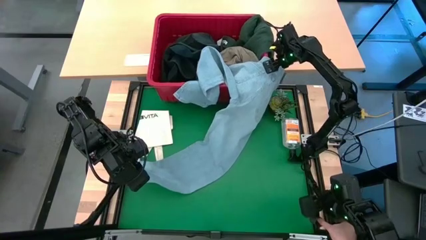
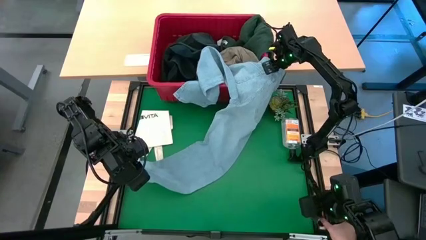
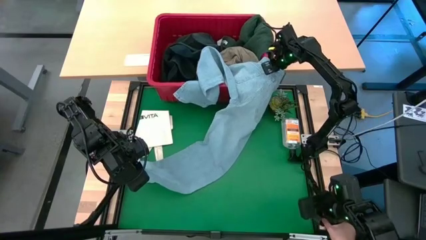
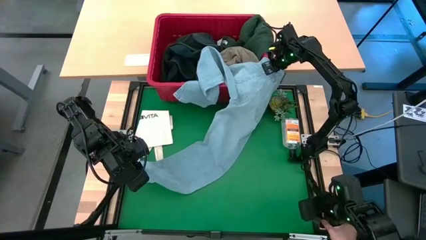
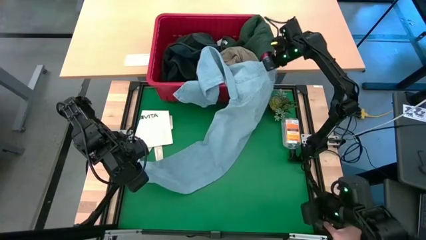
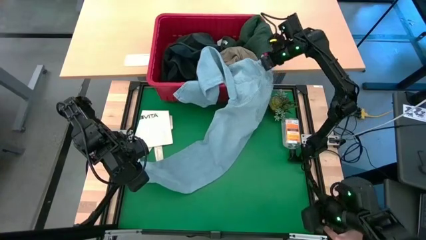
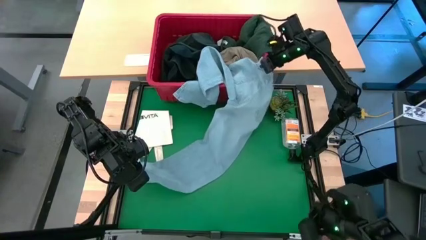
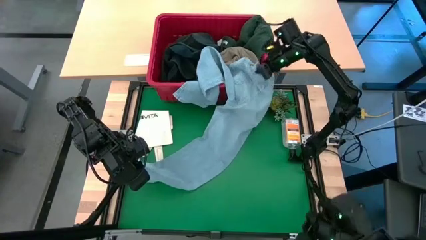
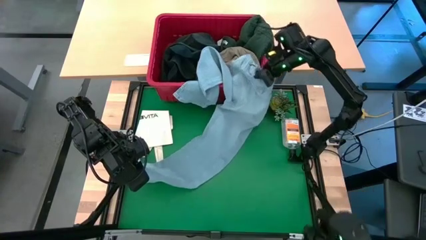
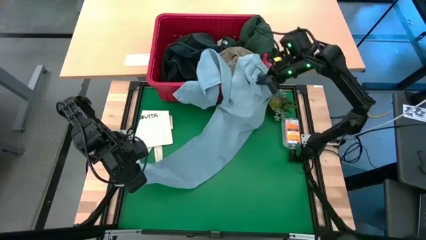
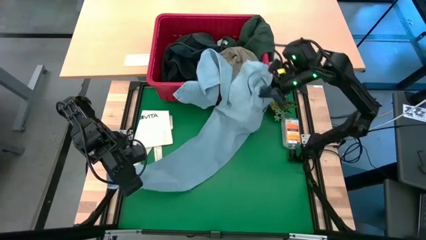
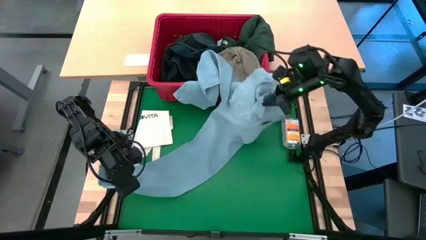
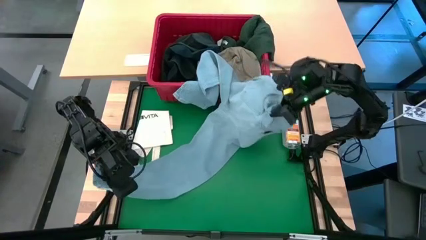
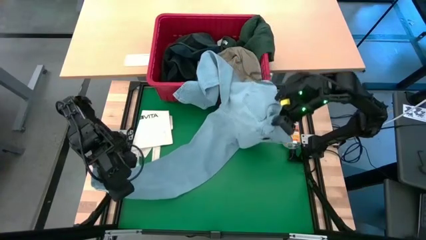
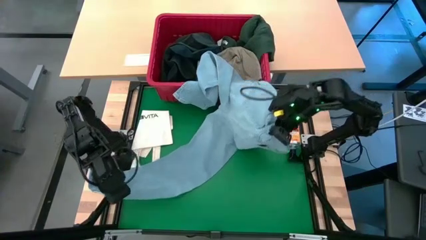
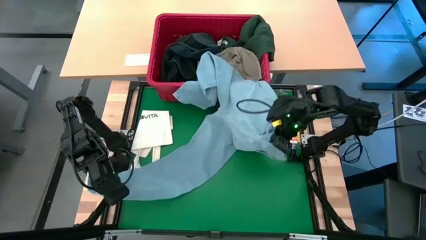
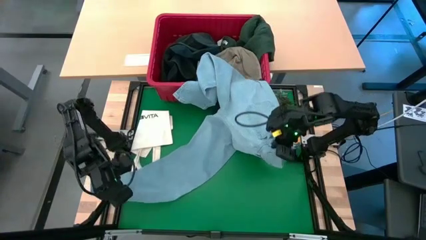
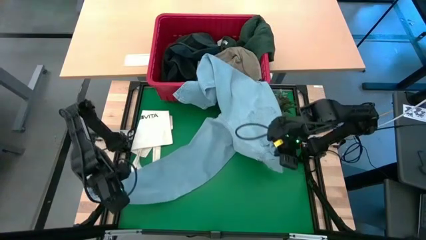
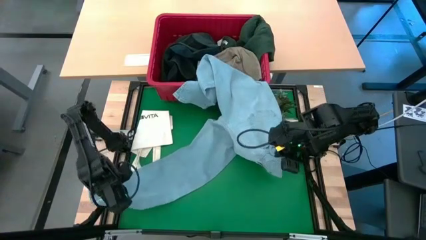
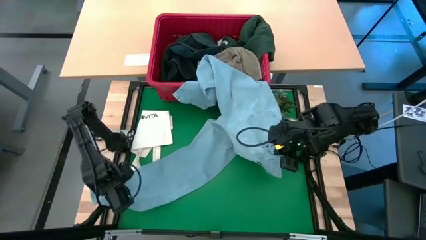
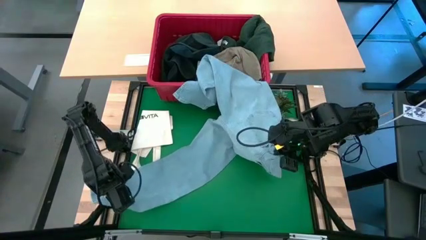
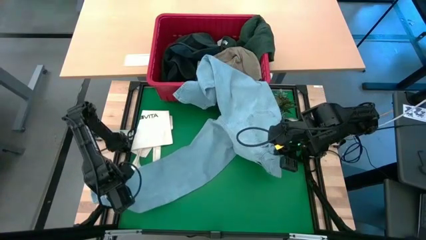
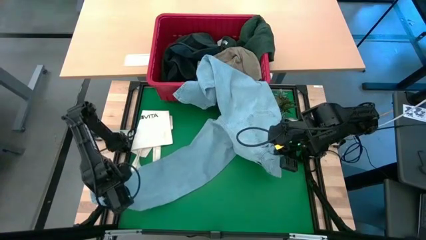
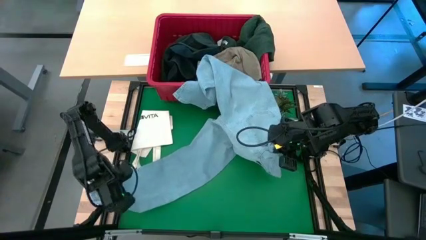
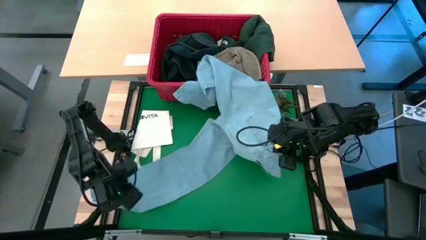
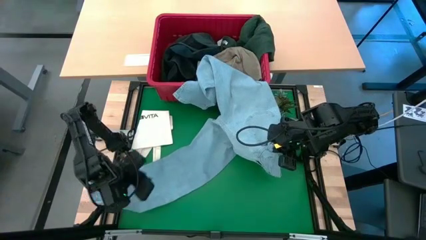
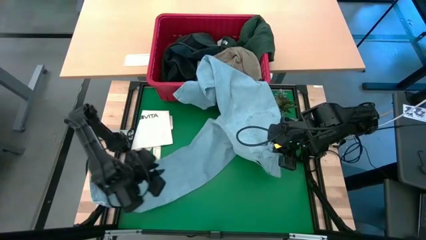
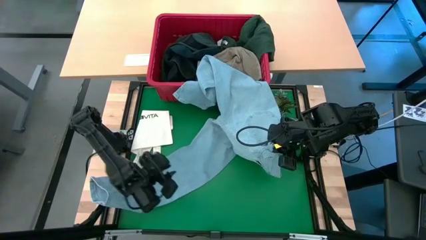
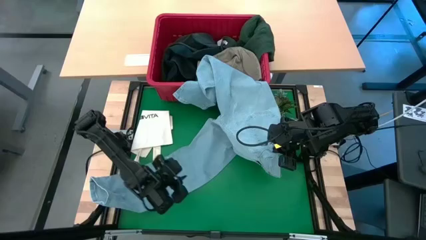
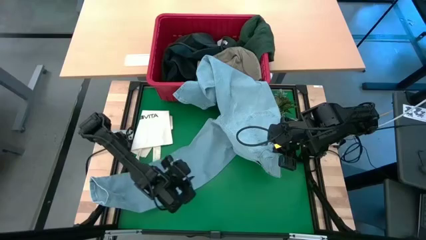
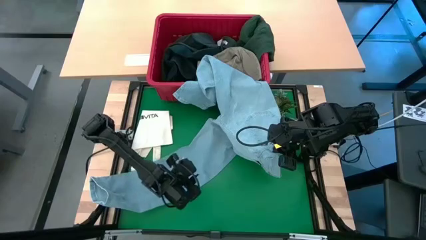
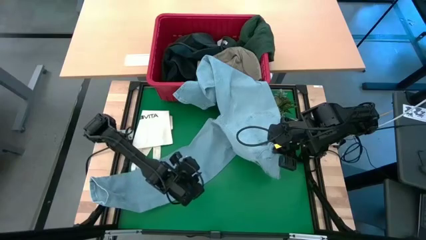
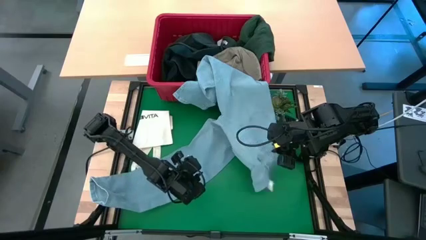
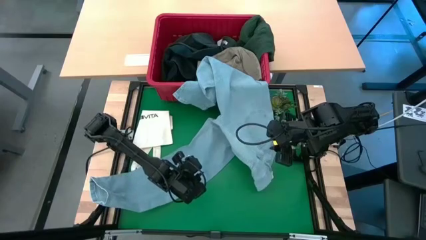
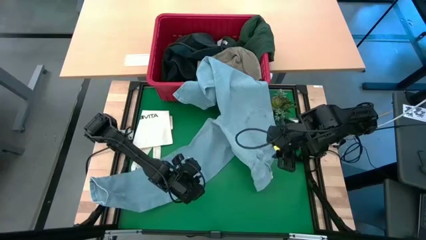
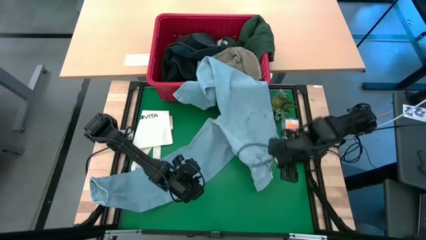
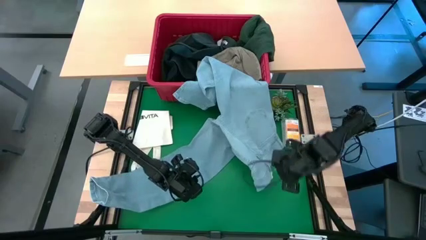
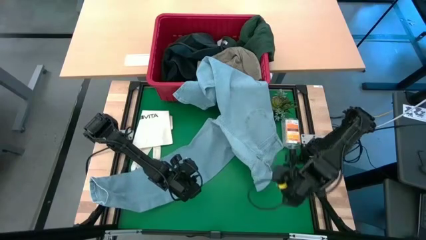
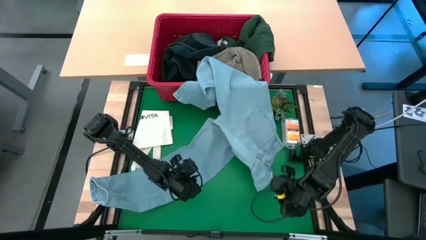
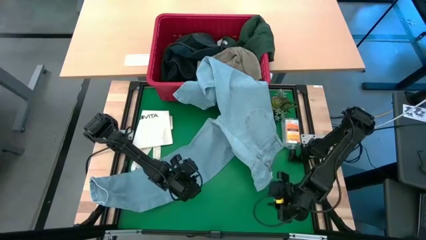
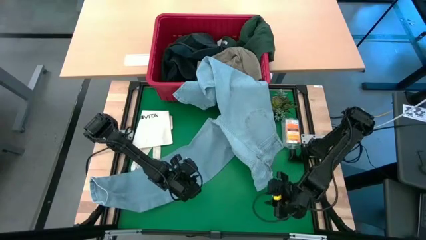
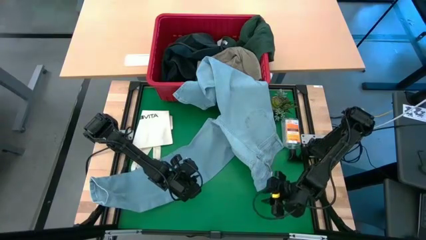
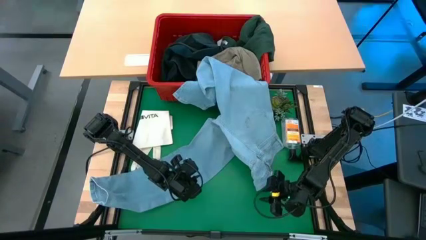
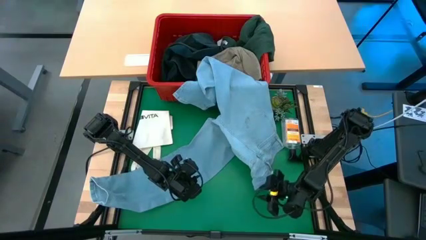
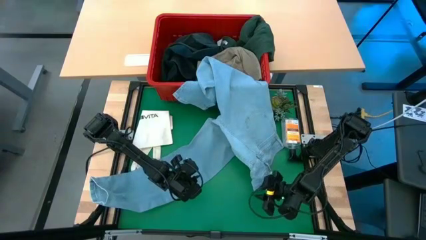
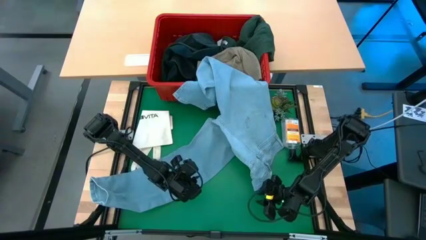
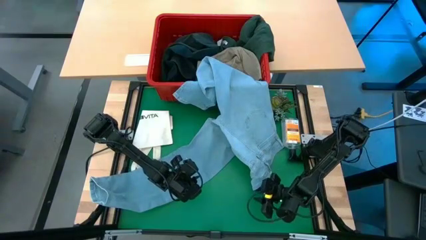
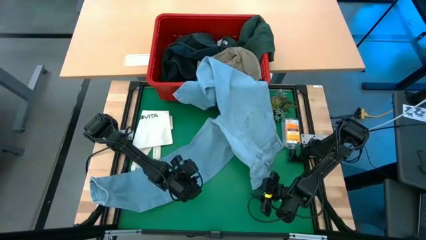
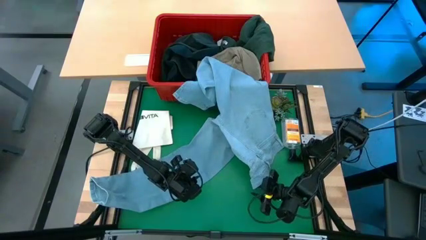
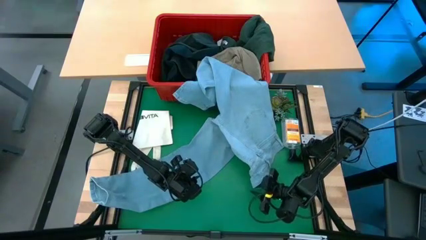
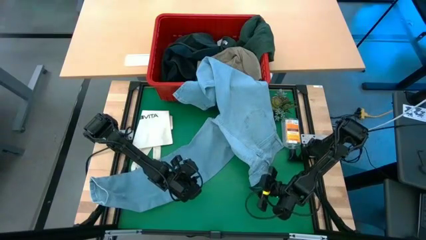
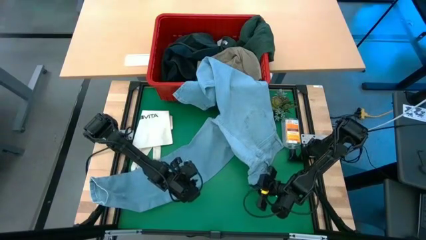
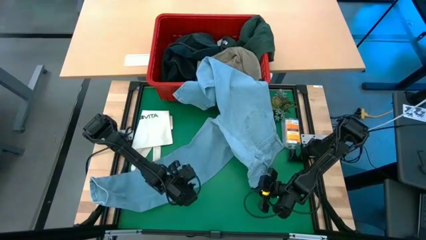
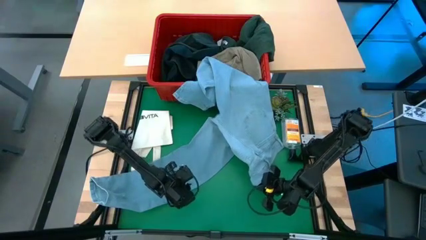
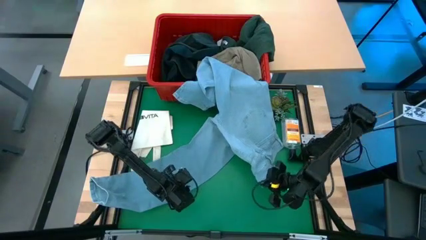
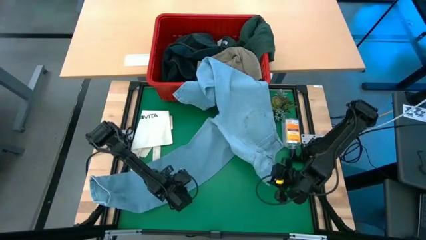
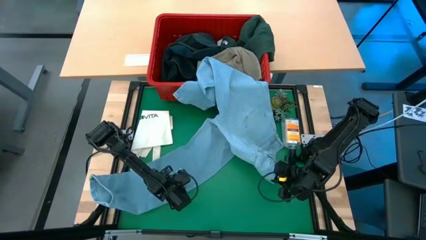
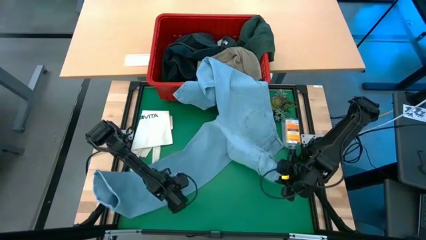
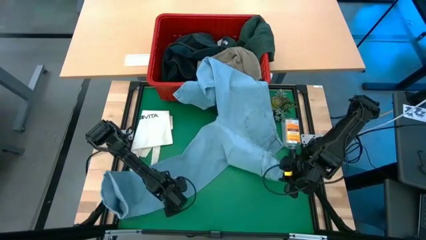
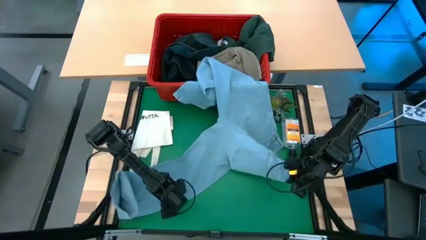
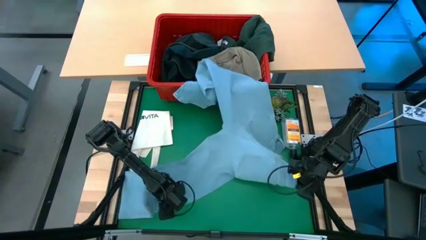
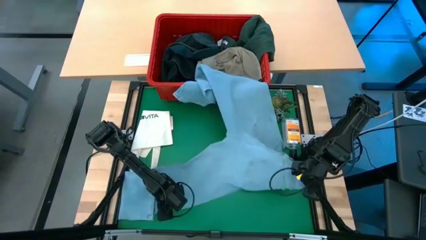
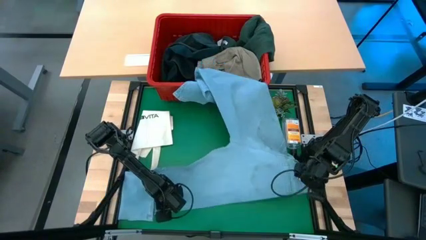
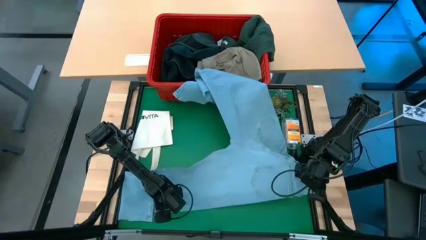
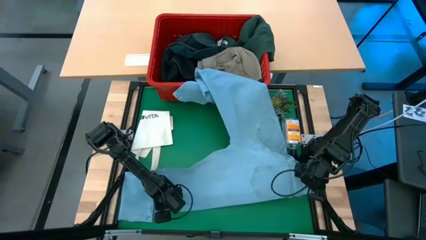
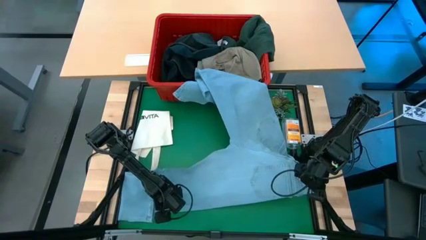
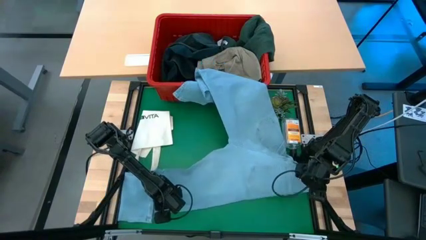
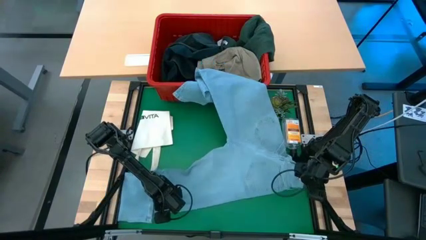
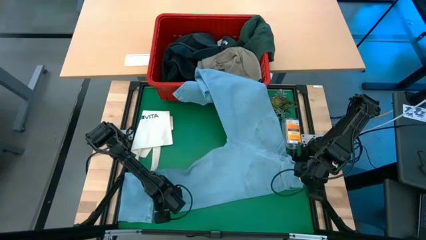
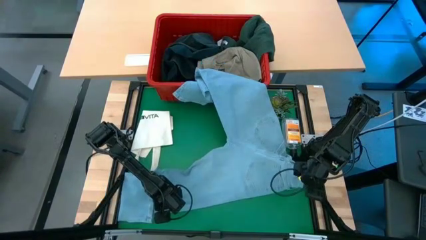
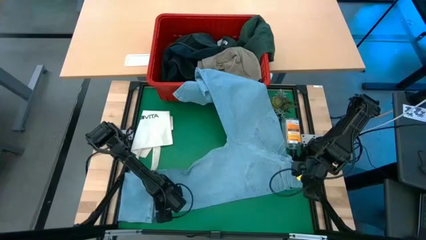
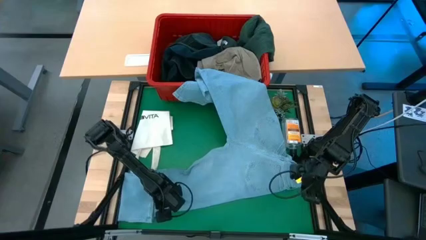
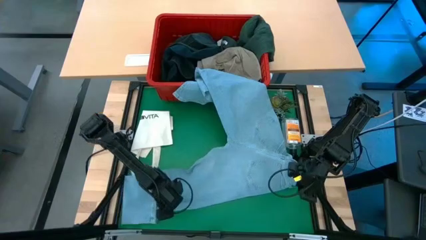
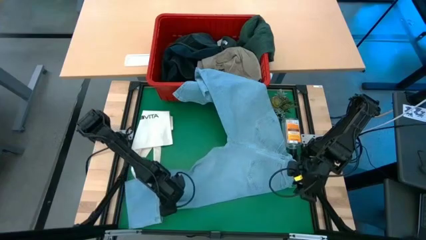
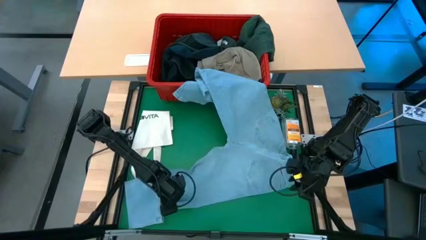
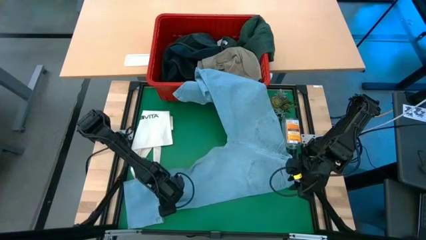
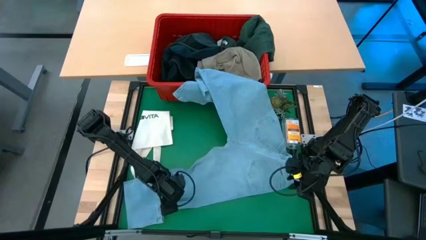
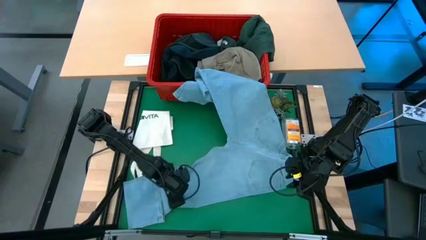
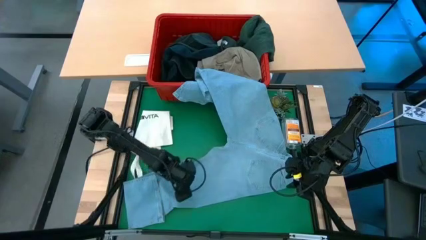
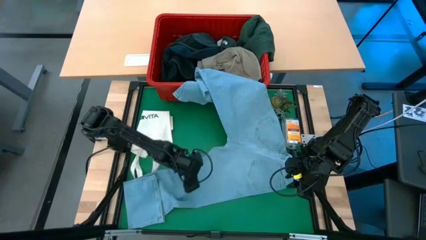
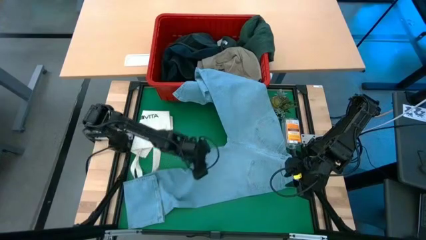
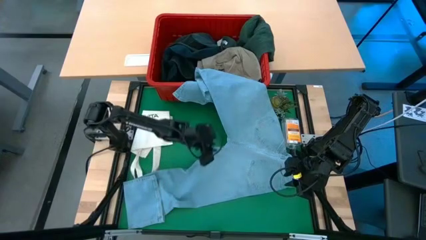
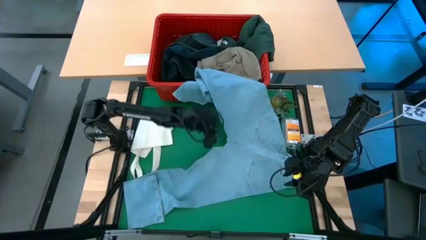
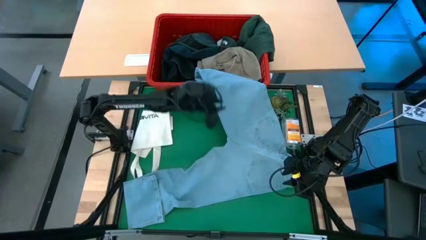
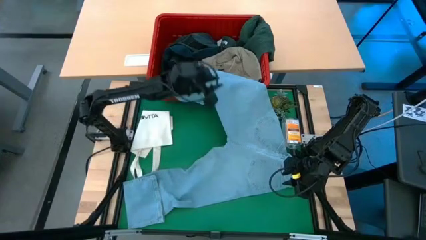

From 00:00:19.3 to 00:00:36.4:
Task: Fold Laundry from Bin
Remove the light blue jeans from the red bin
